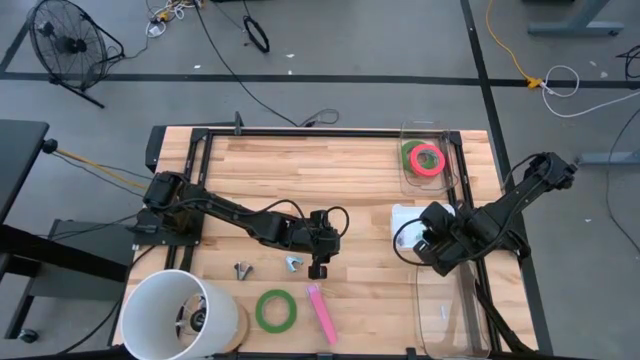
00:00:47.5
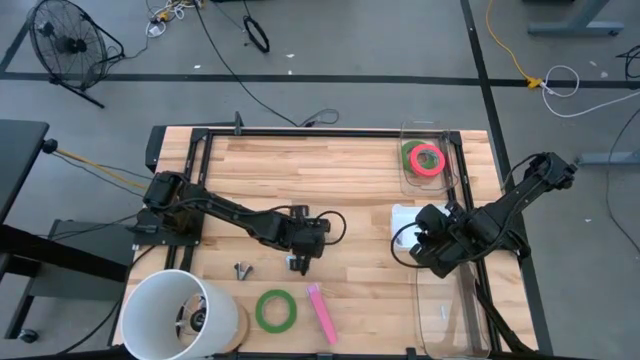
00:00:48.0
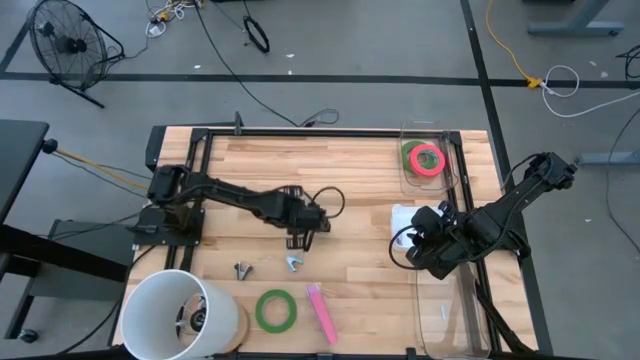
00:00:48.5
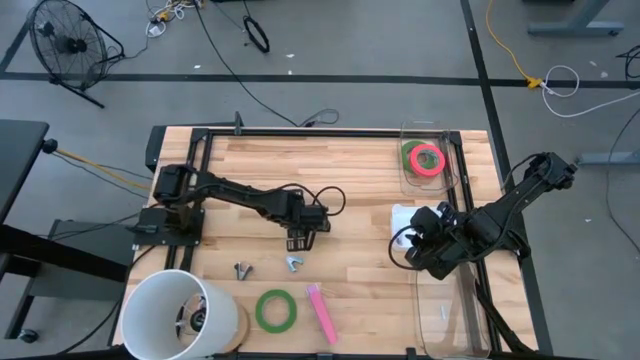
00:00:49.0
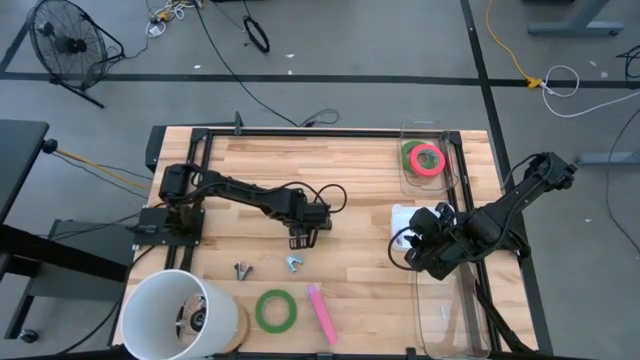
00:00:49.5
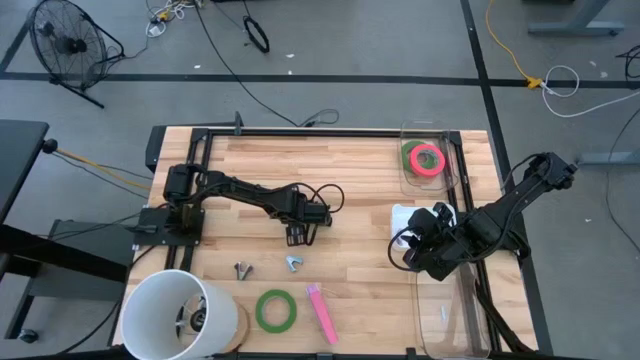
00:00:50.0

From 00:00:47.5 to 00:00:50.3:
Task: Pick and place Stapler, Stapler remover, tape
Put the black stapler into the bottom transparent bin

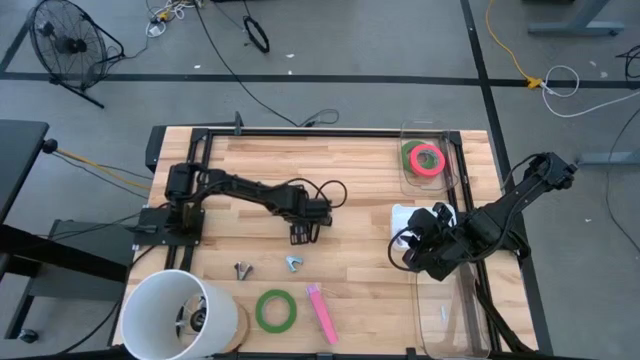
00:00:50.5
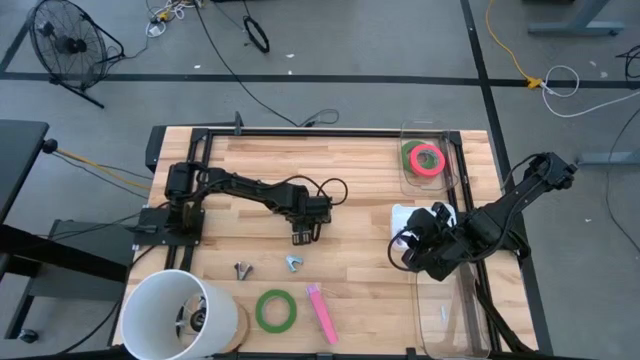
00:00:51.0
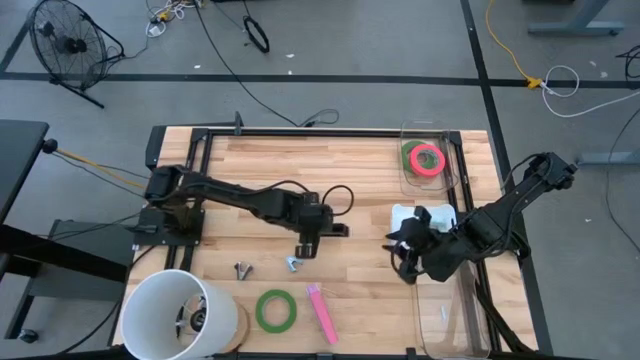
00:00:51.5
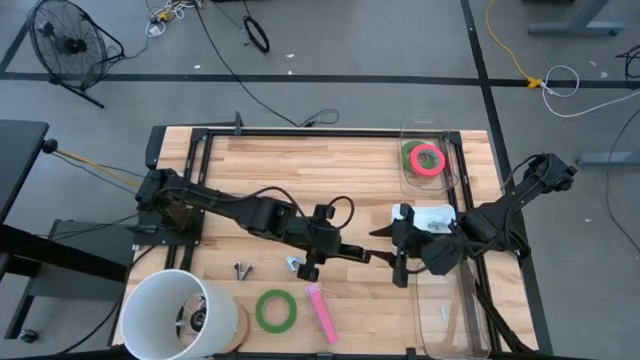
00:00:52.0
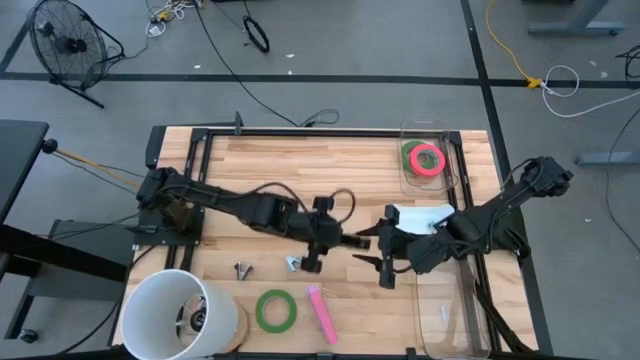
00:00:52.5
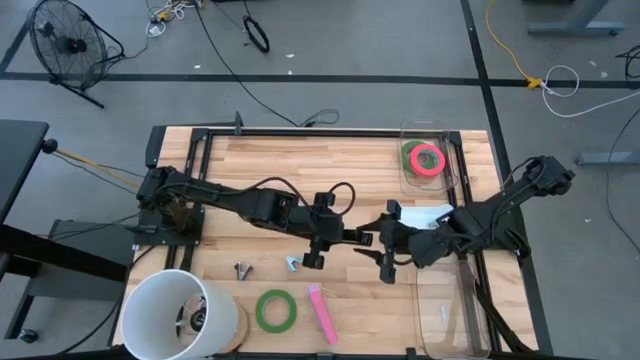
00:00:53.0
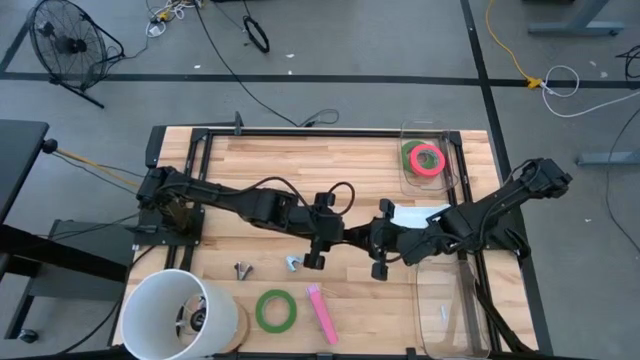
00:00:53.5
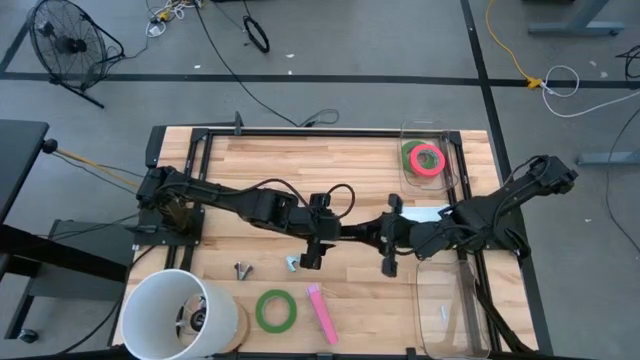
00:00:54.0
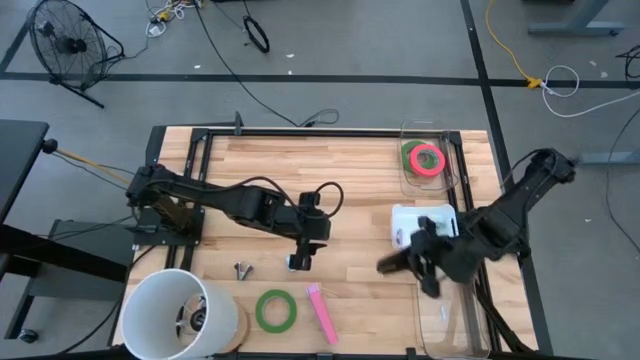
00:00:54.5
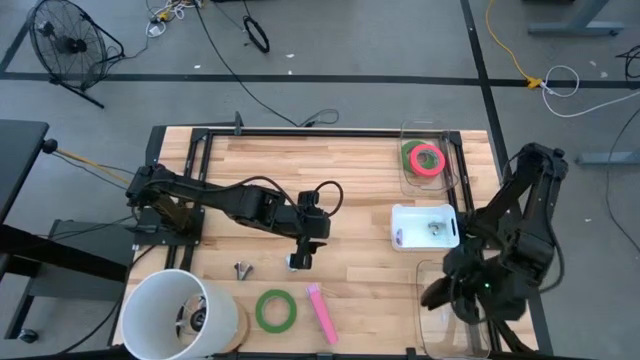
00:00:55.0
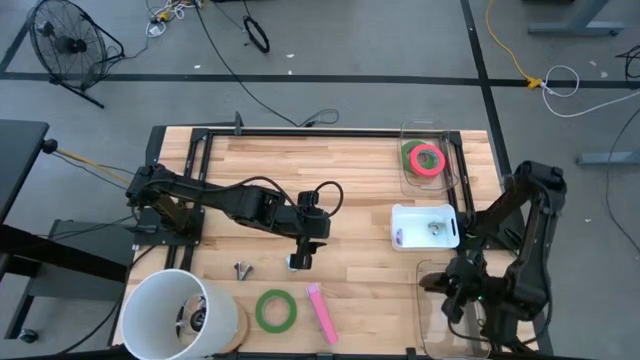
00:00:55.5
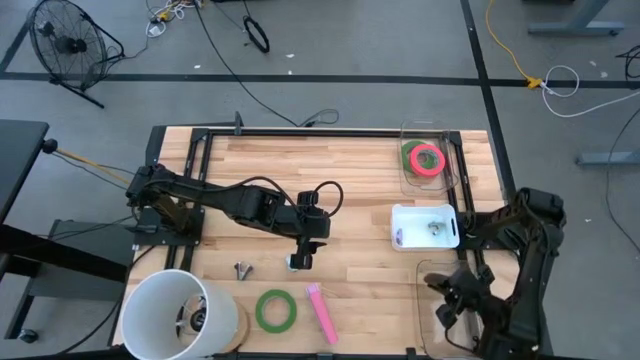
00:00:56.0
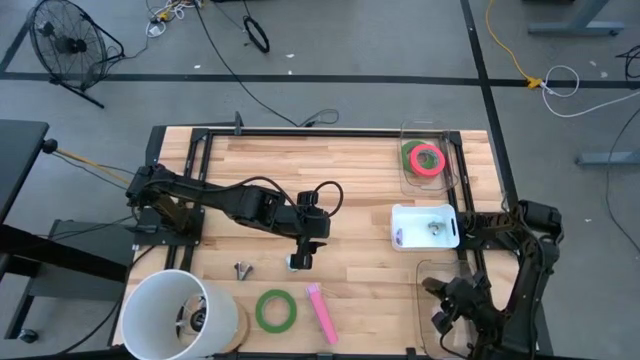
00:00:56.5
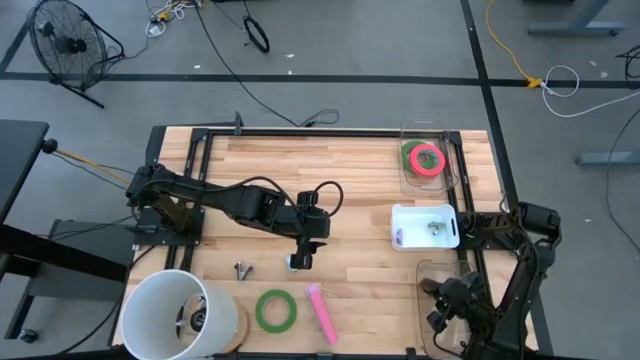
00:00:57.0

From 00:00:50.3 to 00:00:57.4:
Put the black stapler into the bottom transparent bin

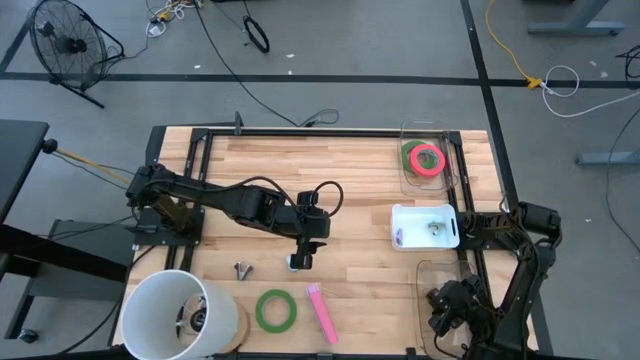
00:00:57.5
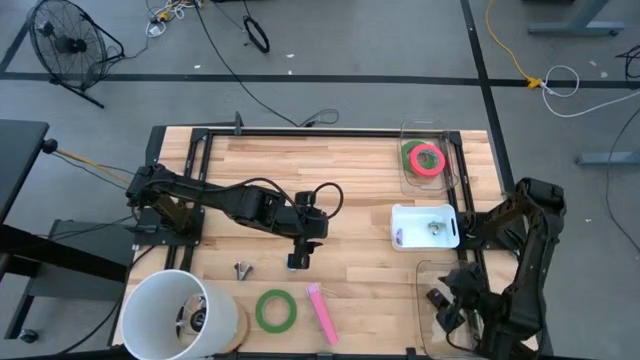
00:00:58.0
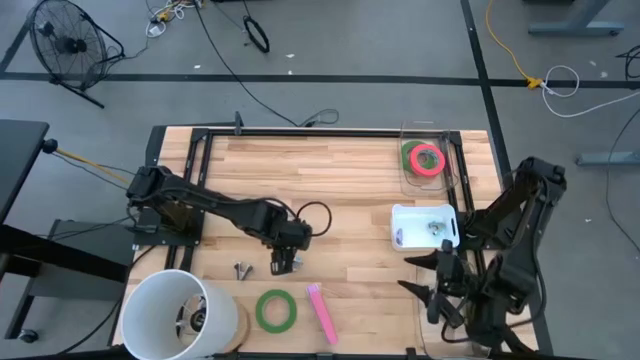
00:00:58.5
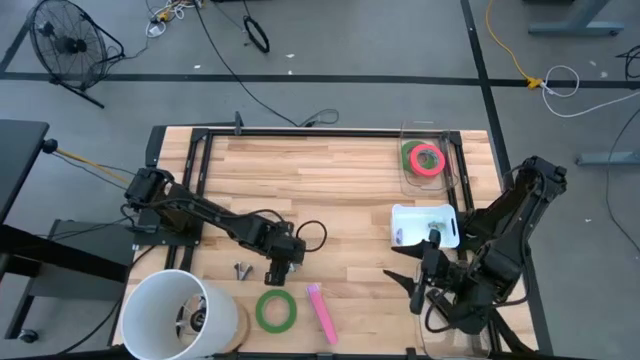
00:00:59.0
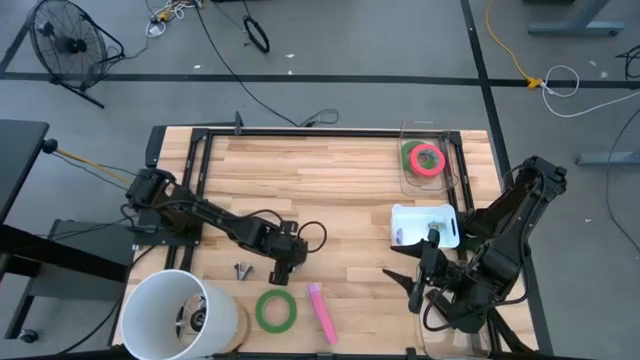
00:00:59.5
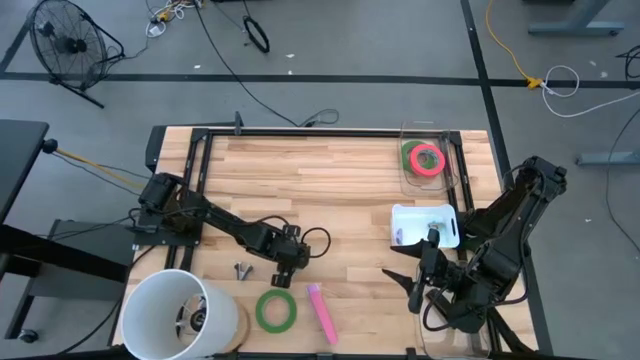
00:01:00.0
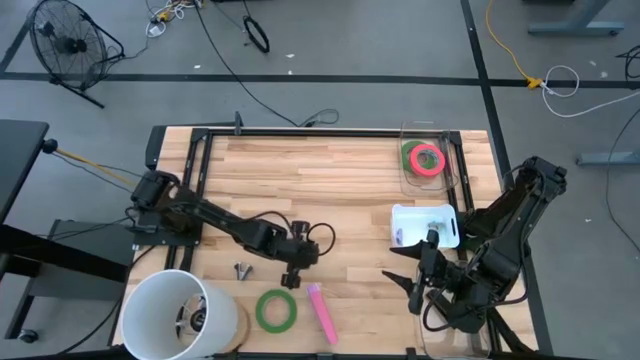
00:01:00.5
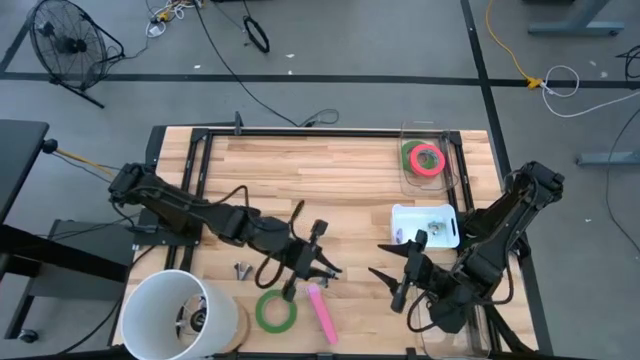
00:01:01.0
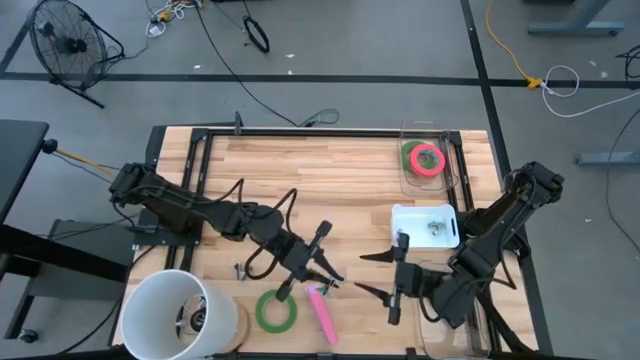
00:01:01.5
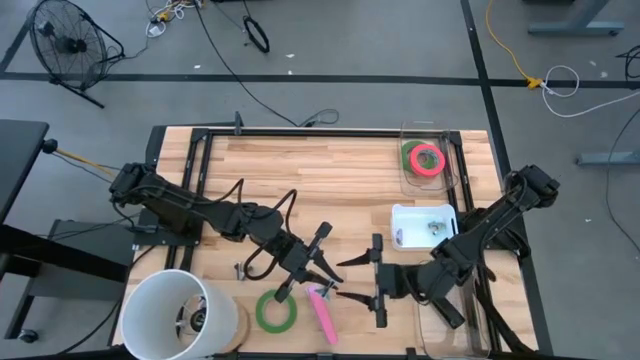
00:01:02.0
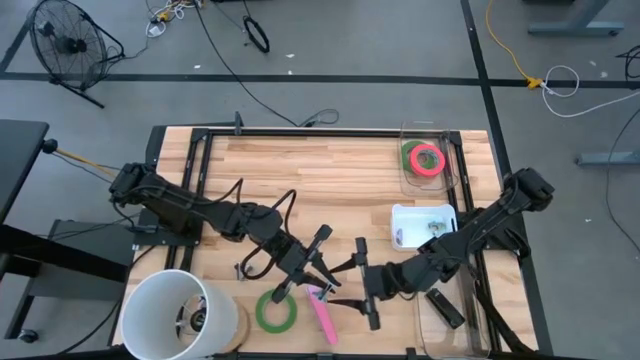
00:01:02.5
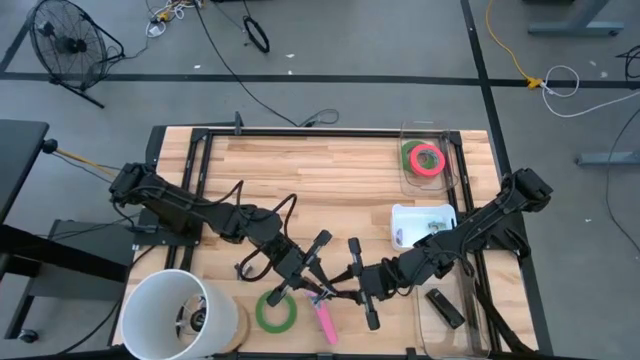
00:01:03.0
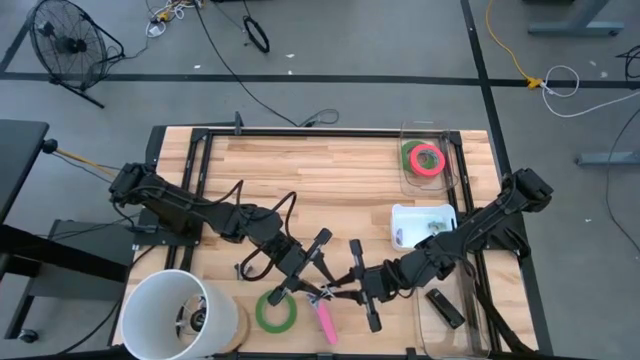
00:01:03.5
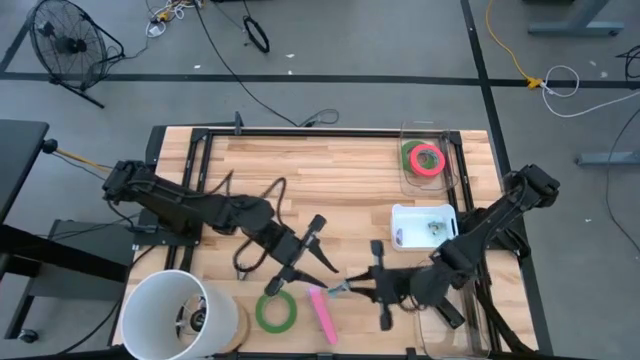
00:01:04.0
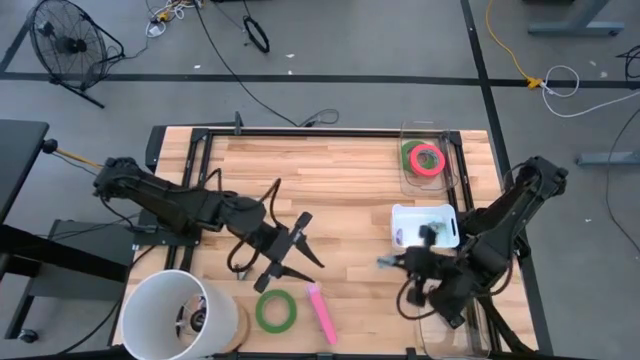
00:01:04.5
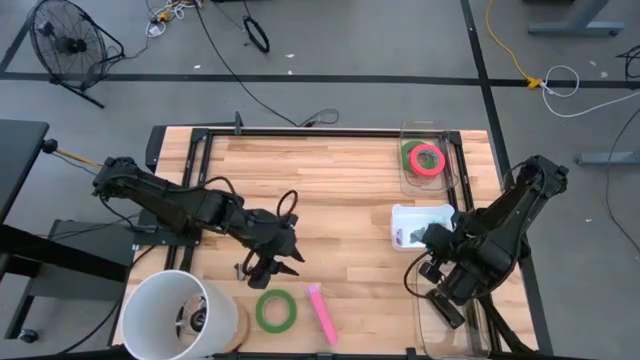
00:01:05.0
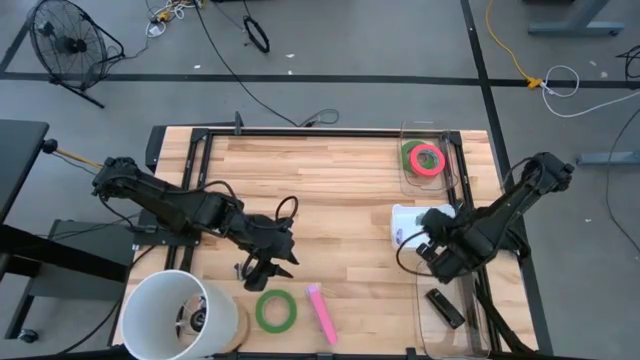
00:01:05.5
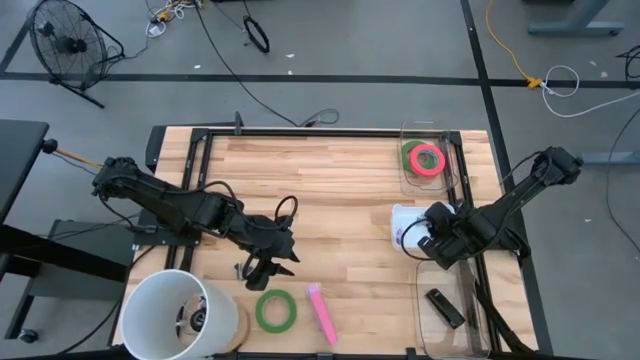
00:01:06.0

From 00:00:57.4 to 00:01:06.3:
Put the light blue staple remover into the white bin

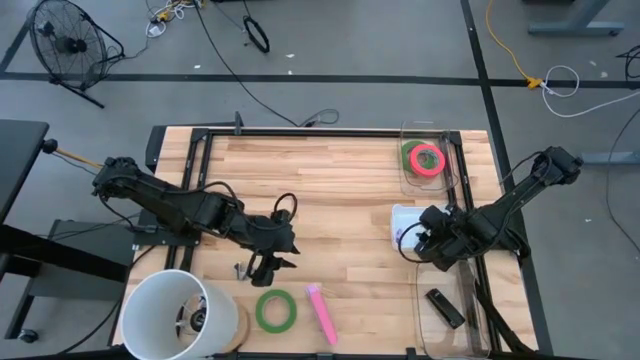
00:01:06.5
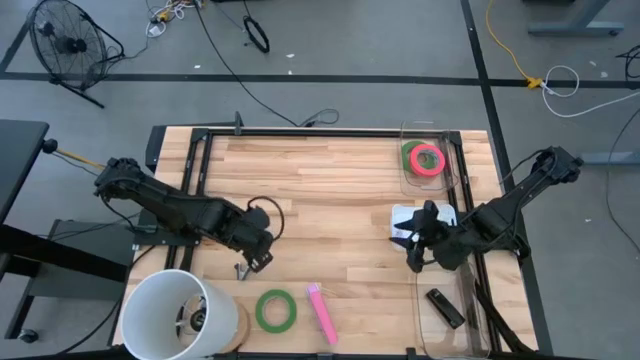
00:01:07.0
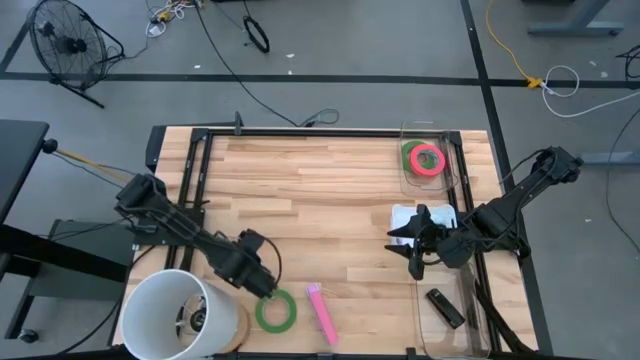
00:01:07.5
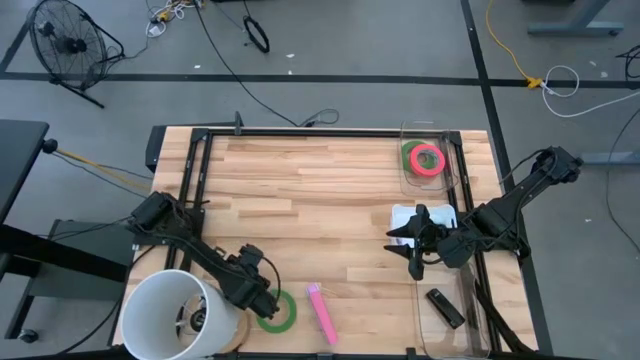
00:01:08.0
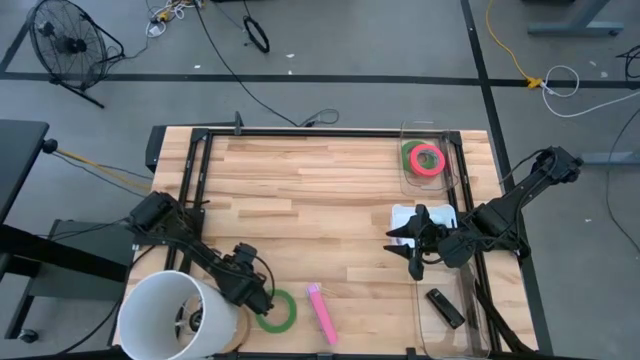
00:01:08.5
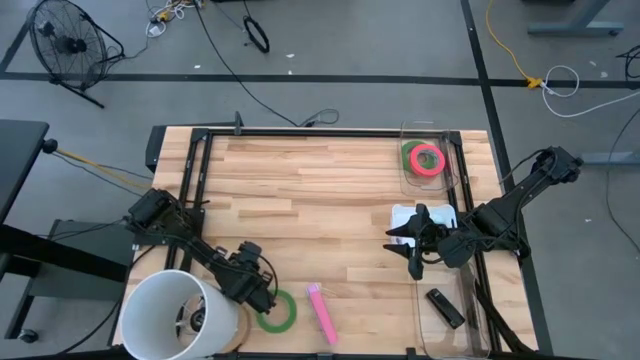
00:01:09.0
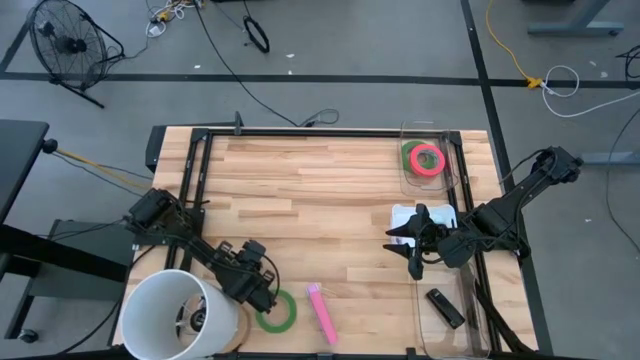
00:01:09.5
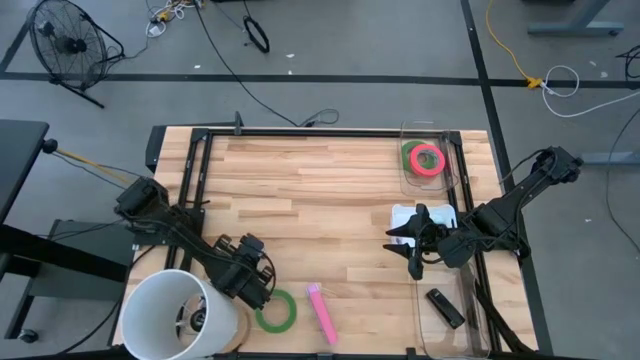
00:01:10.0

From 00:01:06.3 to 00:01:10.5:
Put the black staple remover into the white bin
